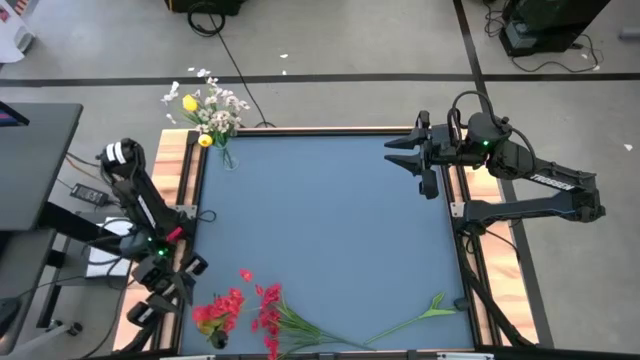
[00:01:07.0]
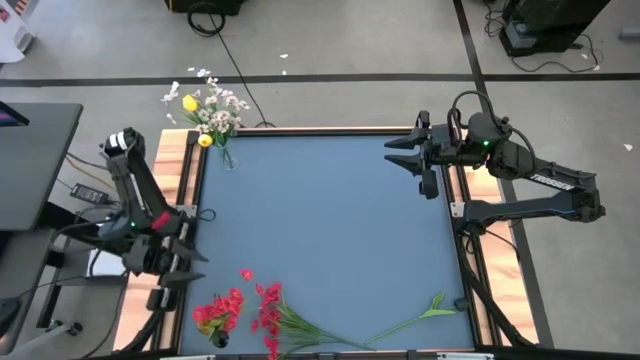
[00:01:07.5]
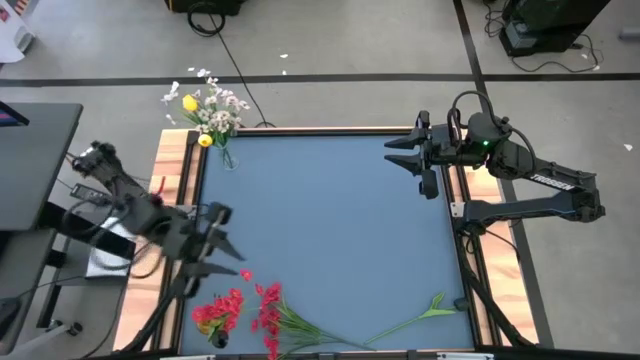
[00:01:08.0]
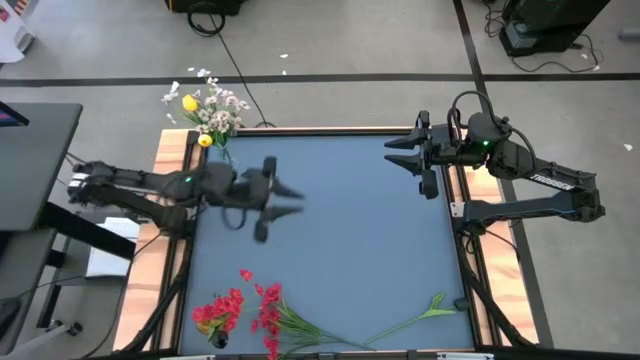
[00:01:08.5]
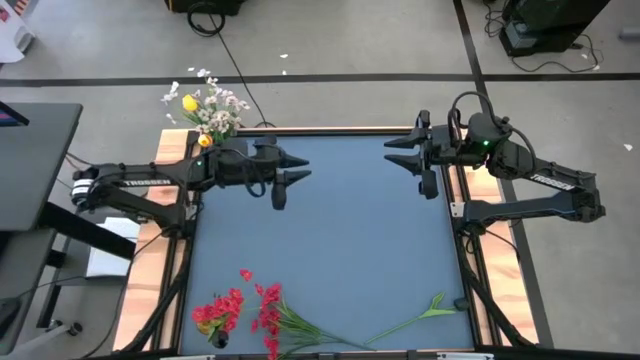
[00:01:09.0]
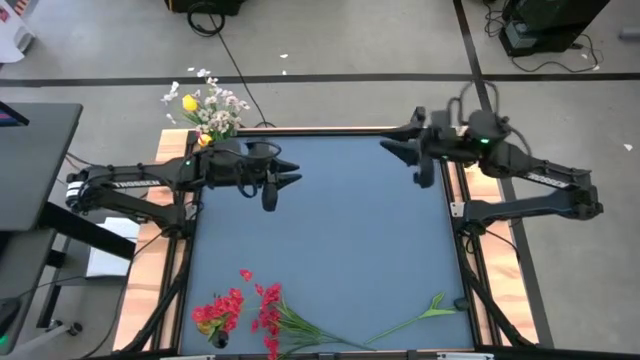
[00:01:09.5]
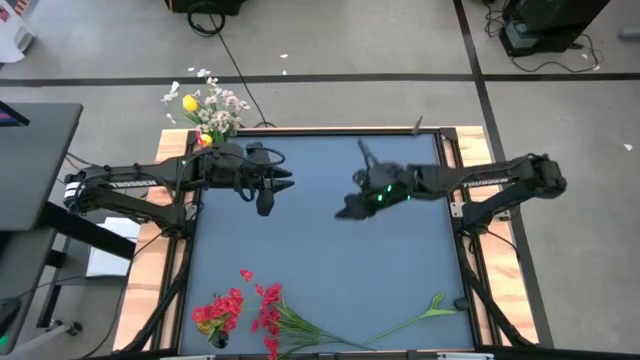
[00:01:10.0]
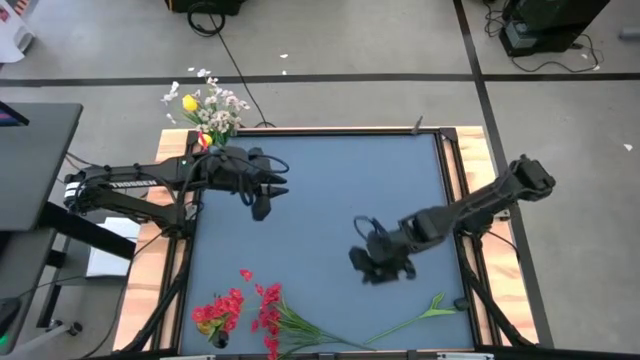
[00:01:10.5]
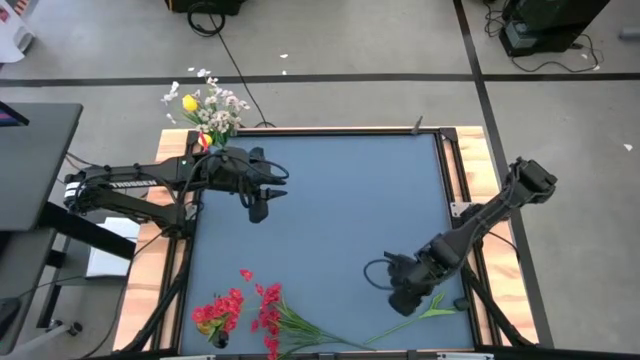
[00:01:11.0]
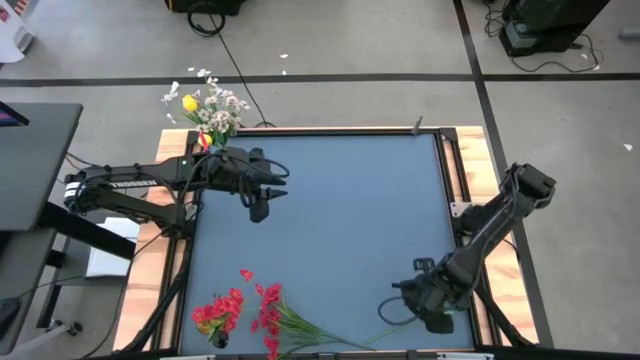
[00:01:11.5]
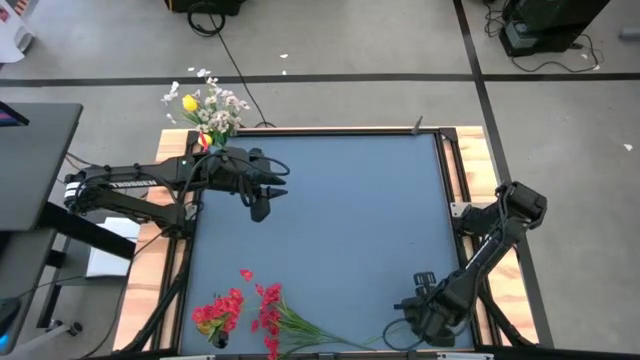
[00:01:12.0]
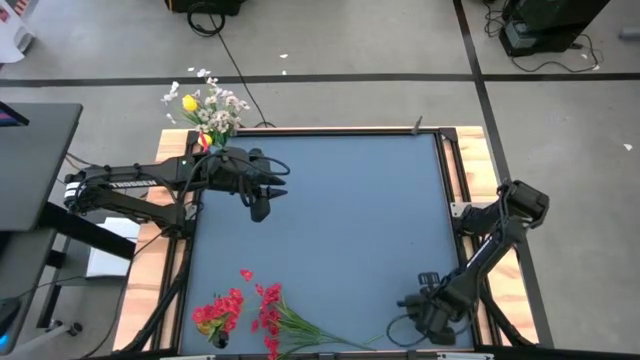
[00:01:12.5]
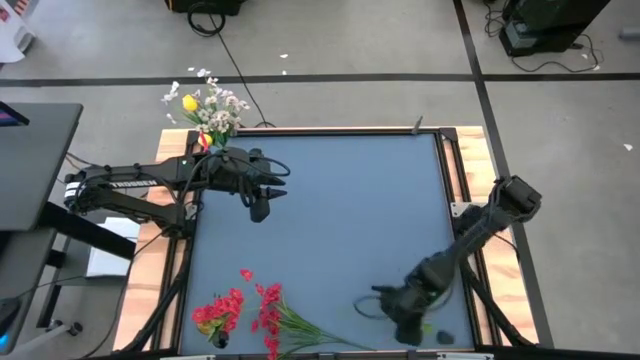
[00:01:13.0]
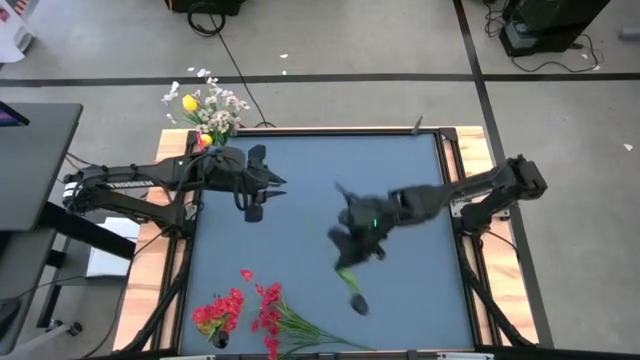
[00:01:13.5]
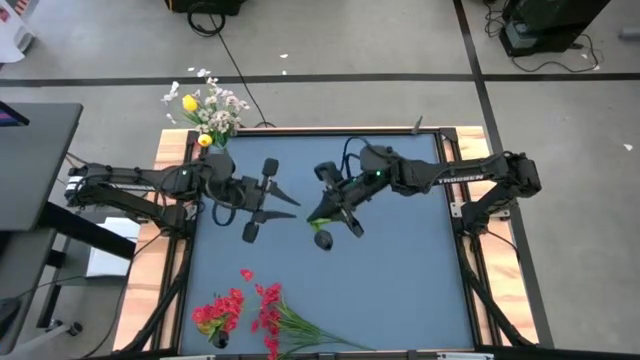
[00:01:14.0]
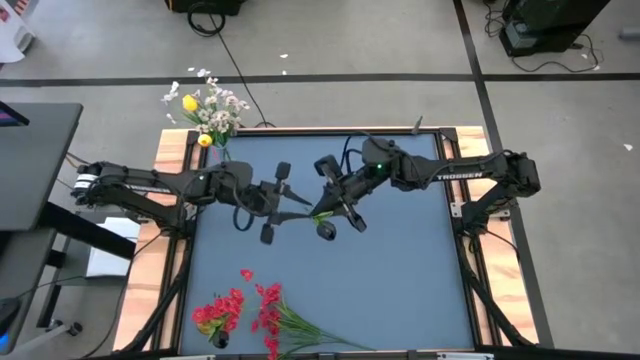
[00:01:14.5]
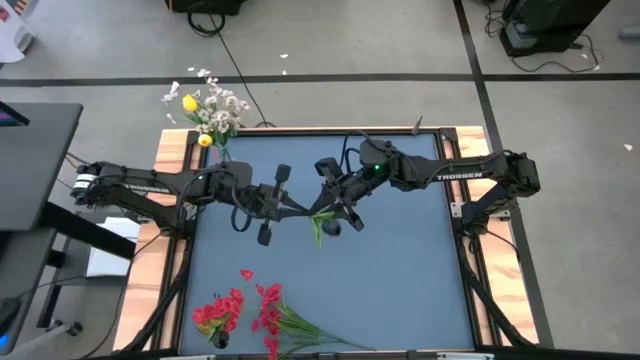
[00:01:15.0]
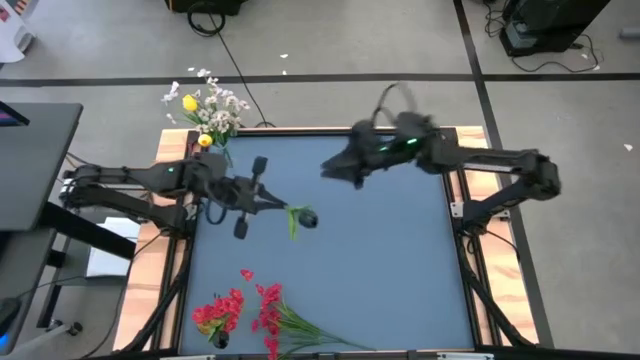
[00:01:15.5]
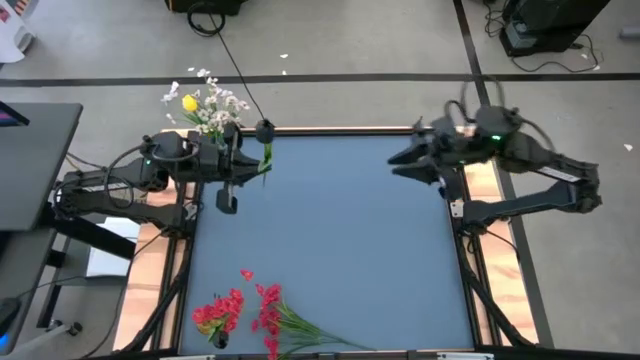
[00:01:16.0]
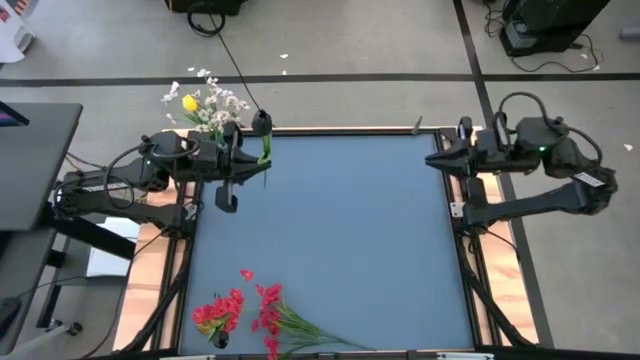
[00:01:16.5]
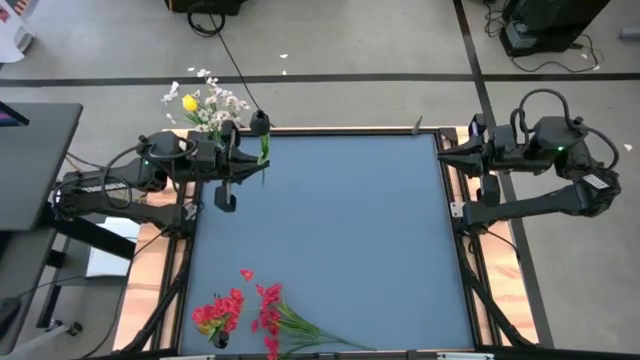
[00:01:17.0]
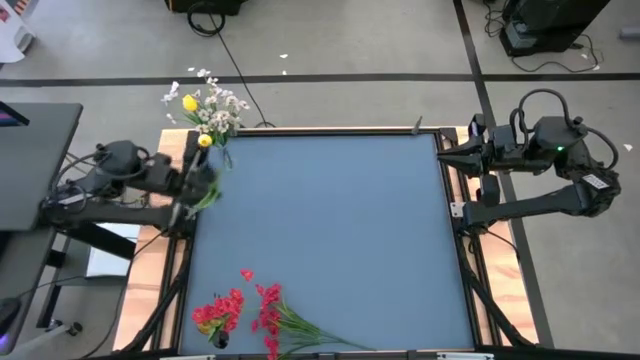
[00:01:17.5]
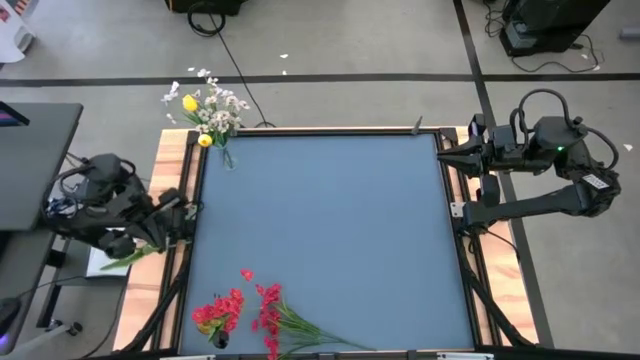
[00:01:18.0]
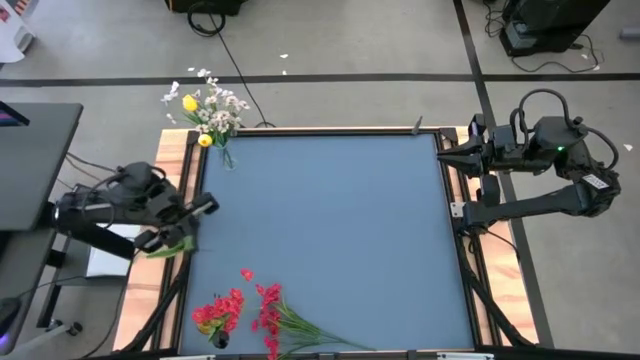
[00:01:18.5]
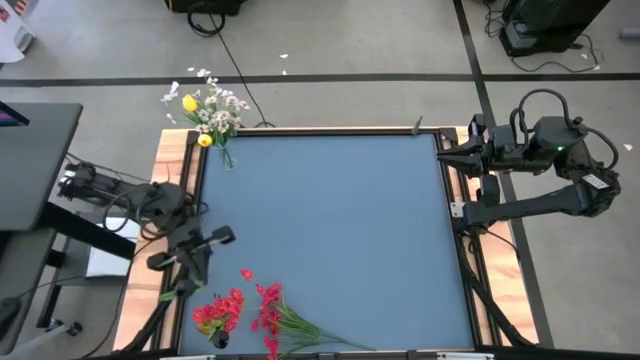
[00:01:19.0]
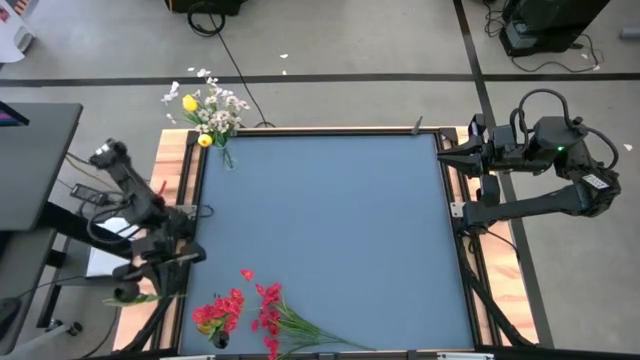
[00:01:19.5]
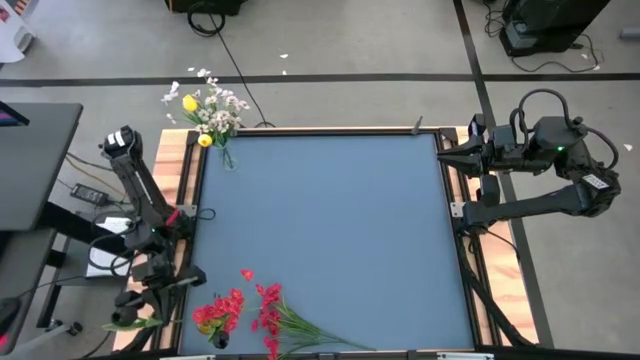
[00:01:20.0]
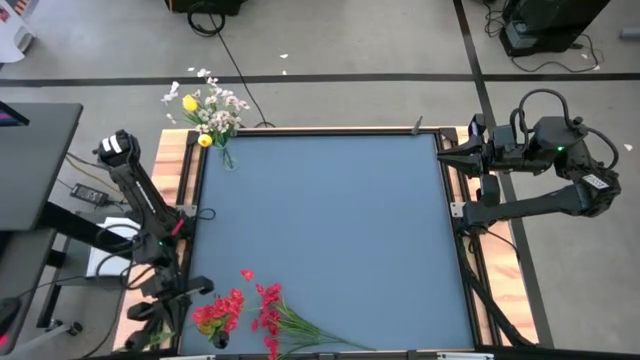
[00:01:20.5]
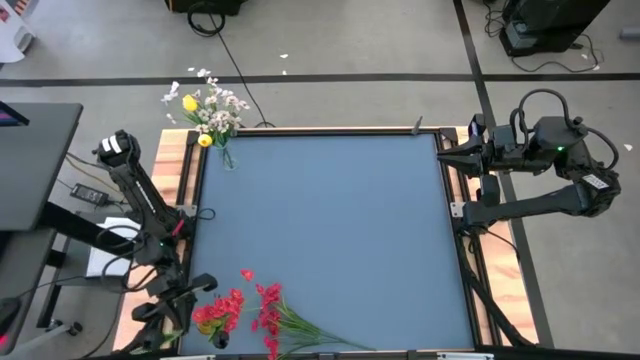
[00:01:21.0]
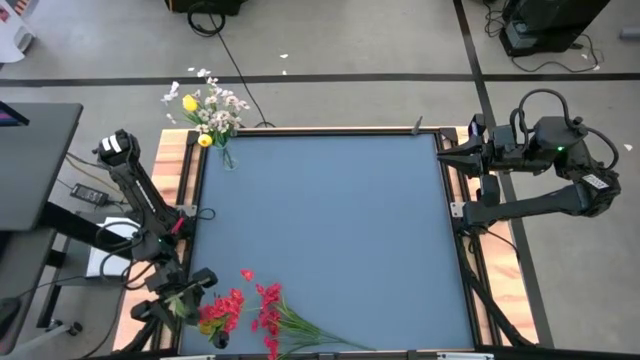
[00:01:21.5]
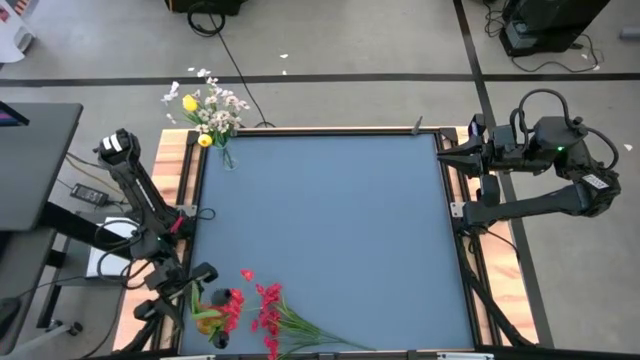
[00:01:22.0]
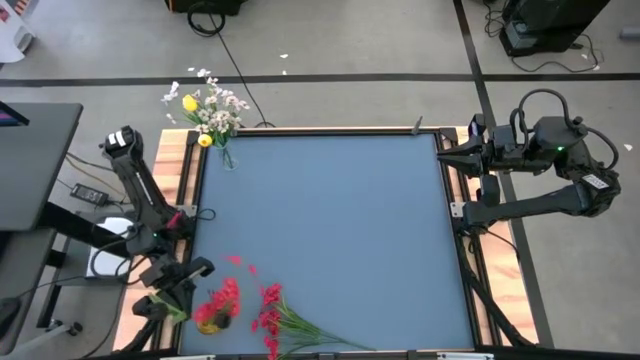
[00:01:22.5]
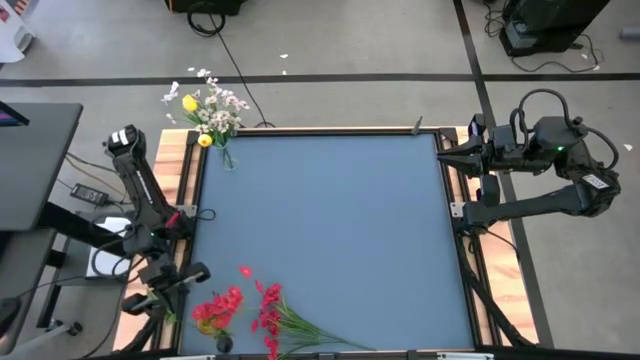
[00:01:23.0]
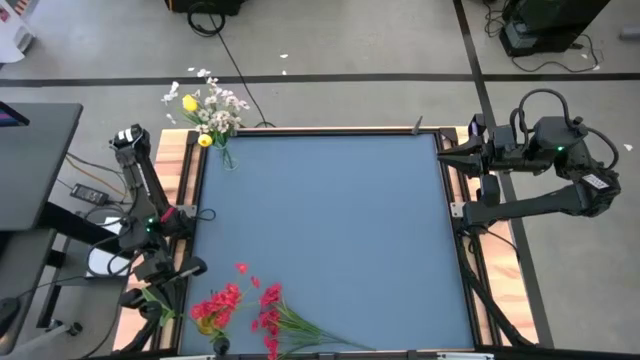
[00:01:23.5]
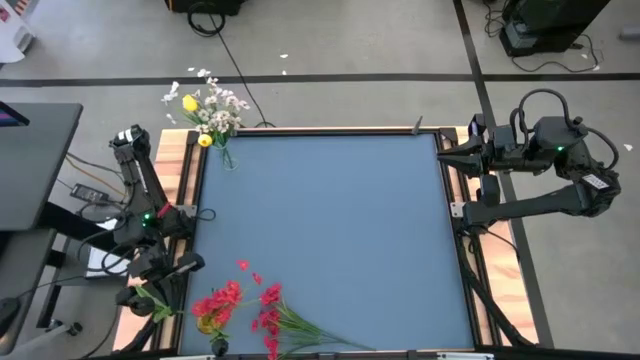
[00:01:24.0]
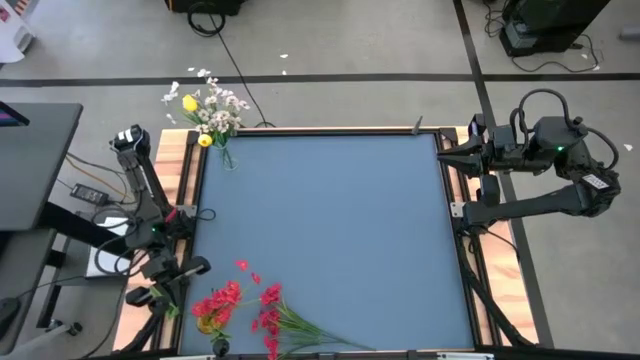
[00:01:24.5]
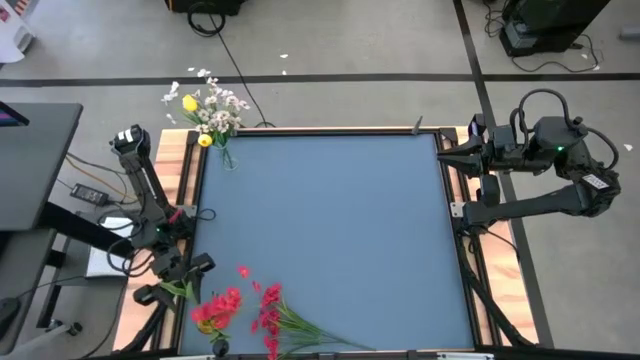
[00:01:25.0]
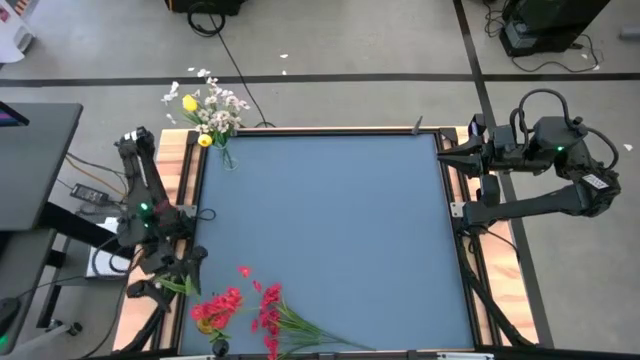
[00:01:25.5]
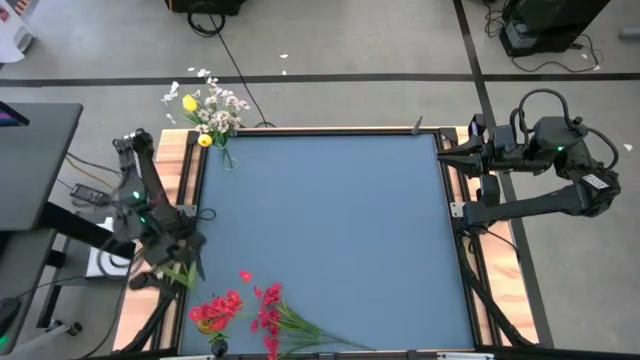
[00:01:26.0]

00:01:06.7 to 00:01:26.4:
Task: Sort flowers into vase by color
Put the black flowers into the yellow vase
